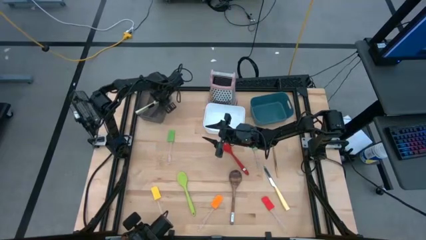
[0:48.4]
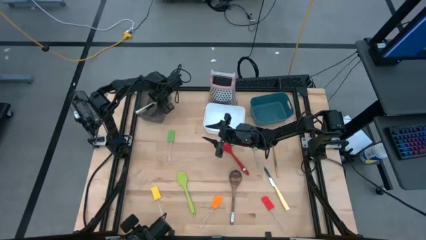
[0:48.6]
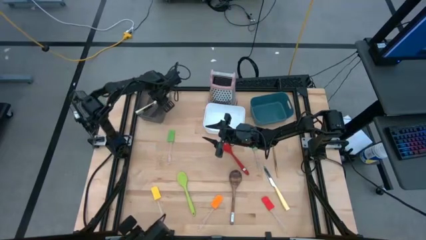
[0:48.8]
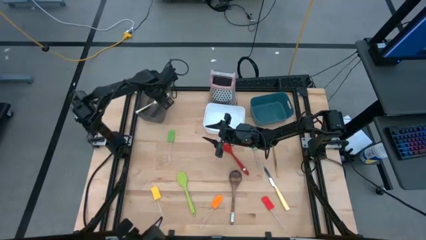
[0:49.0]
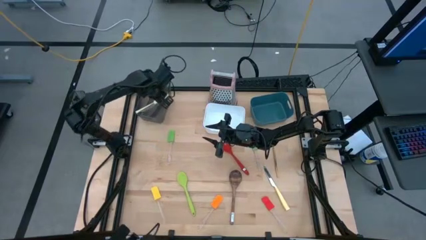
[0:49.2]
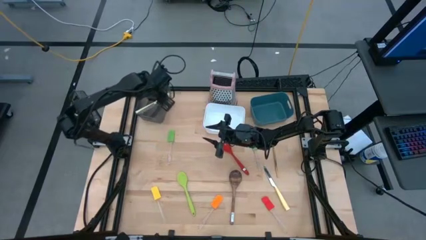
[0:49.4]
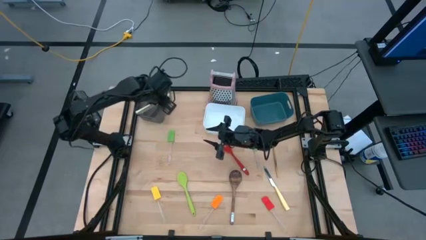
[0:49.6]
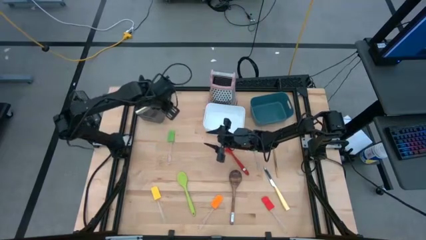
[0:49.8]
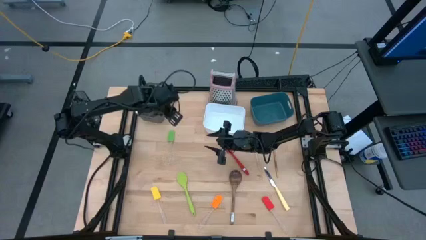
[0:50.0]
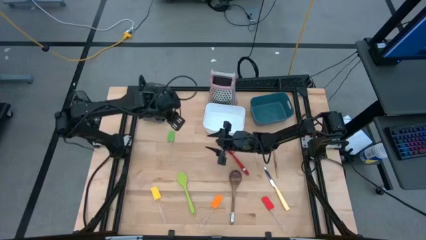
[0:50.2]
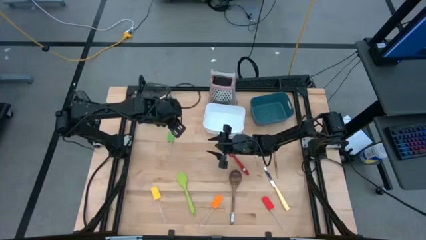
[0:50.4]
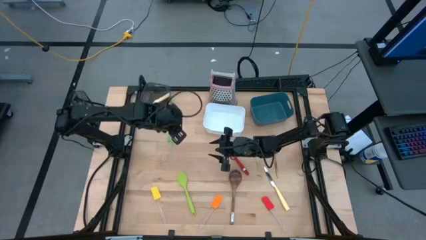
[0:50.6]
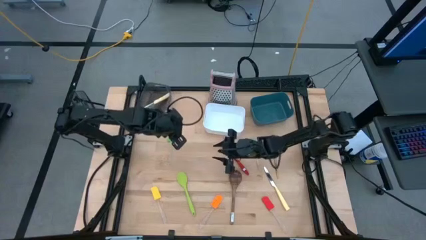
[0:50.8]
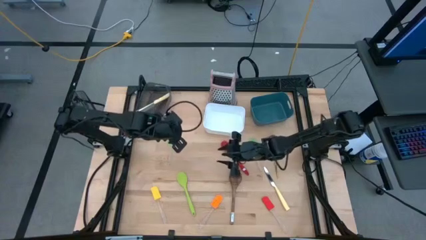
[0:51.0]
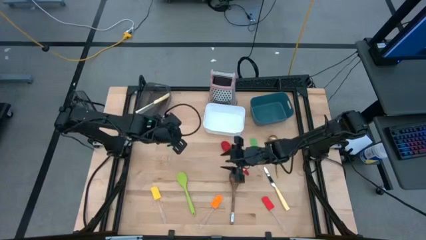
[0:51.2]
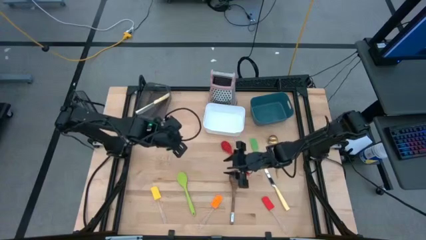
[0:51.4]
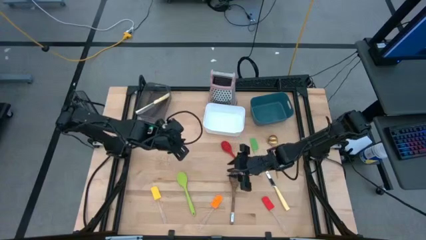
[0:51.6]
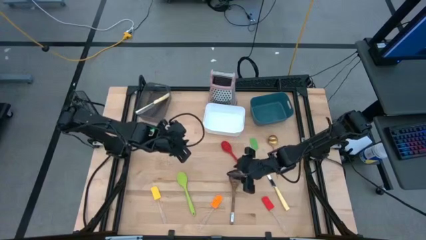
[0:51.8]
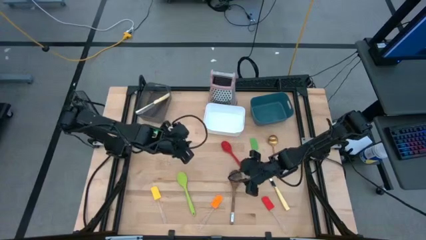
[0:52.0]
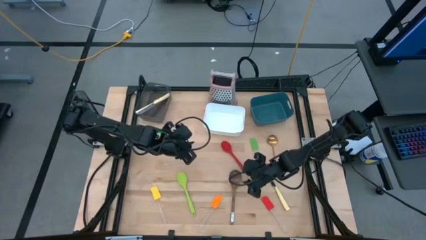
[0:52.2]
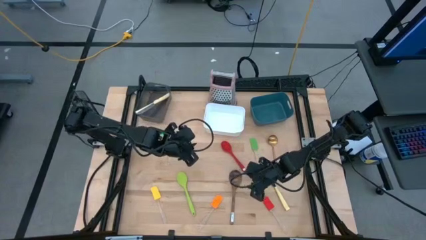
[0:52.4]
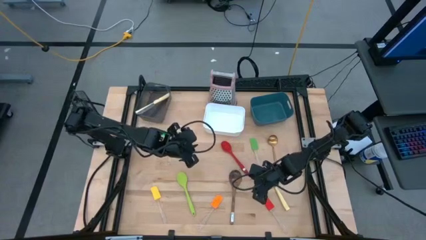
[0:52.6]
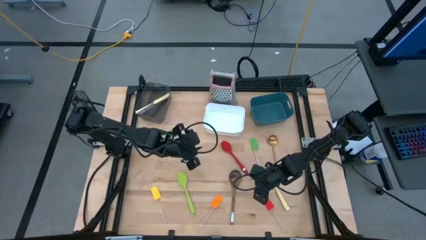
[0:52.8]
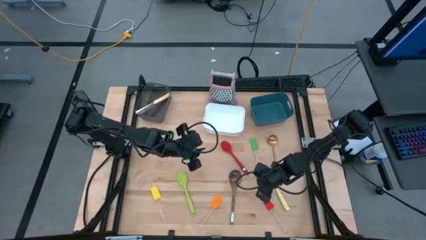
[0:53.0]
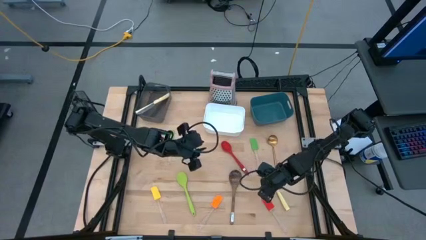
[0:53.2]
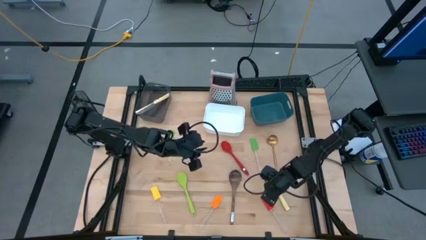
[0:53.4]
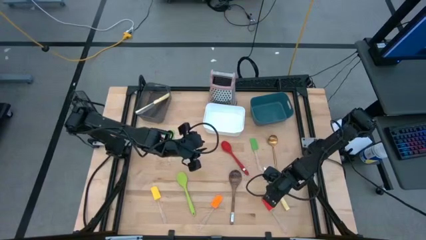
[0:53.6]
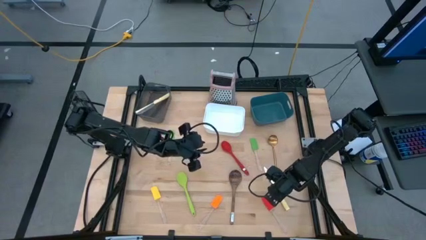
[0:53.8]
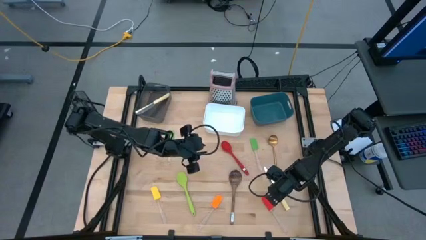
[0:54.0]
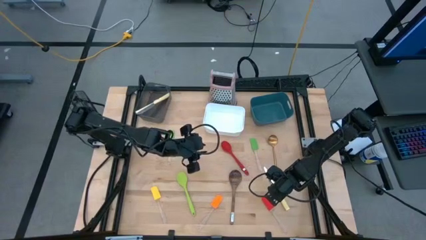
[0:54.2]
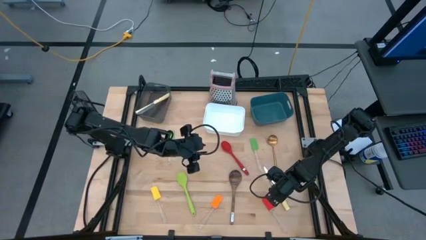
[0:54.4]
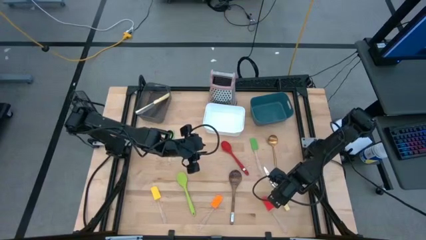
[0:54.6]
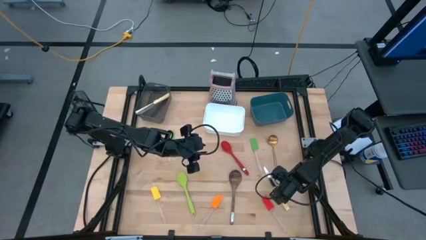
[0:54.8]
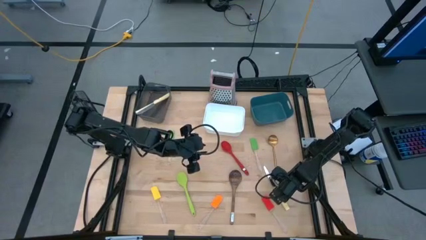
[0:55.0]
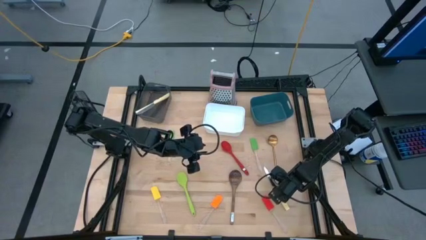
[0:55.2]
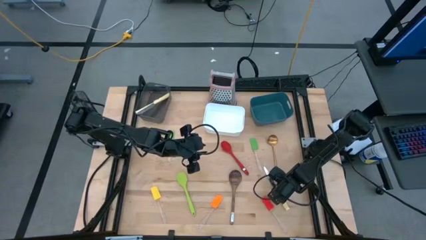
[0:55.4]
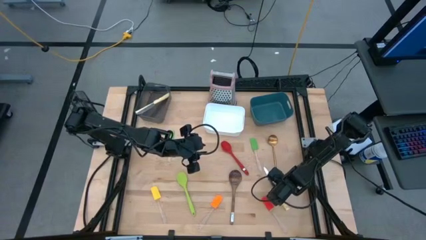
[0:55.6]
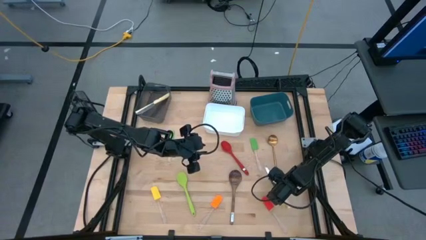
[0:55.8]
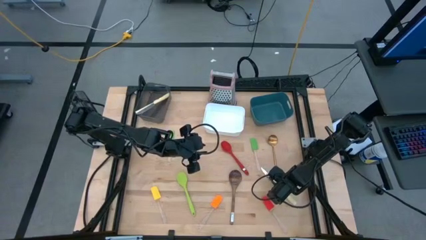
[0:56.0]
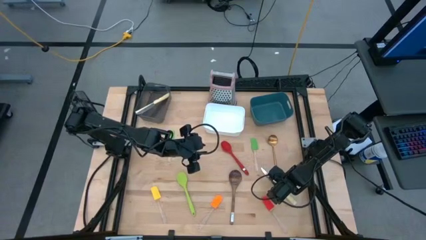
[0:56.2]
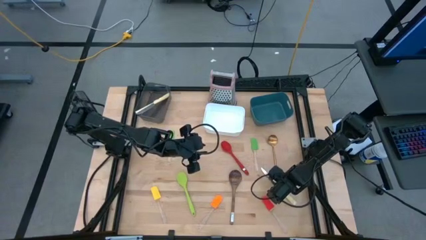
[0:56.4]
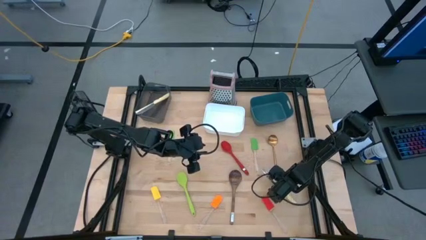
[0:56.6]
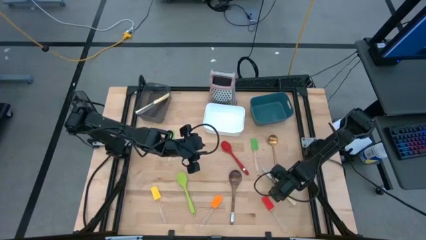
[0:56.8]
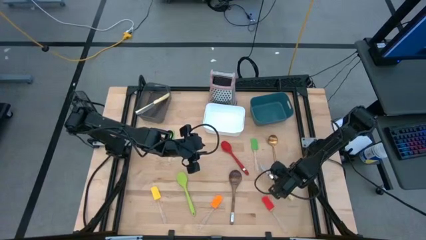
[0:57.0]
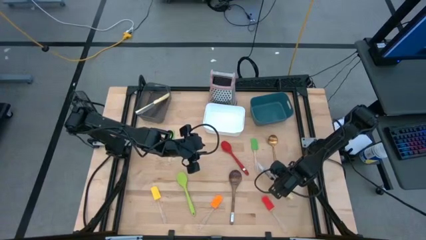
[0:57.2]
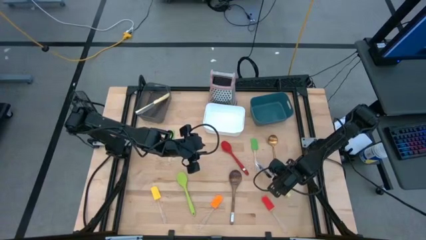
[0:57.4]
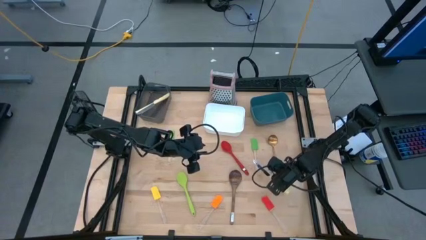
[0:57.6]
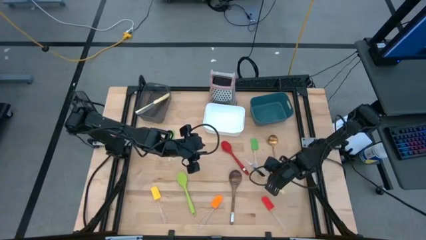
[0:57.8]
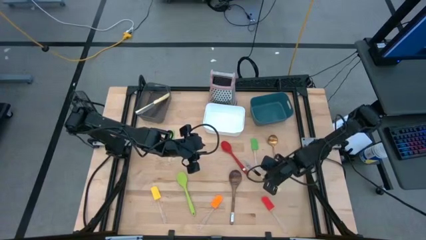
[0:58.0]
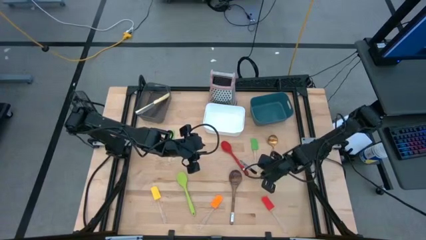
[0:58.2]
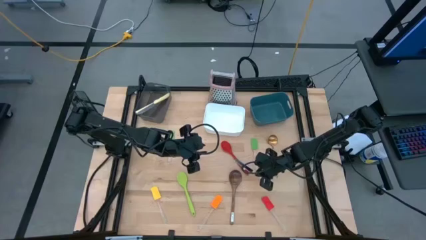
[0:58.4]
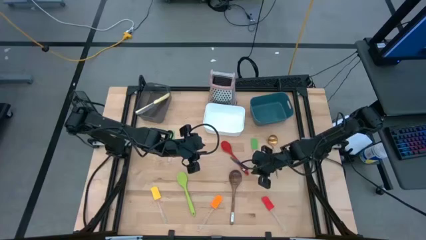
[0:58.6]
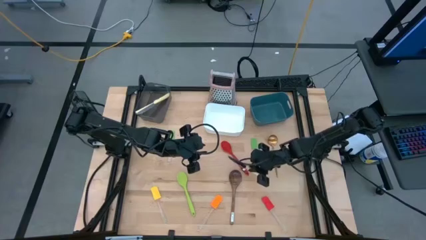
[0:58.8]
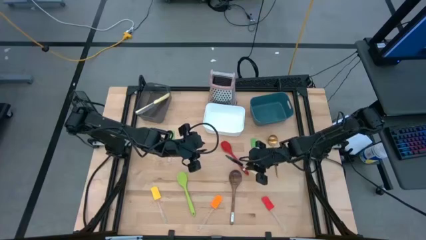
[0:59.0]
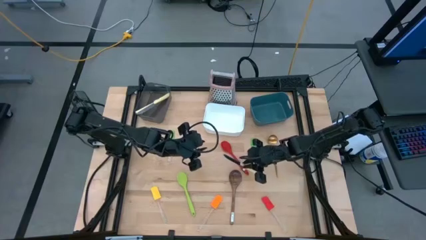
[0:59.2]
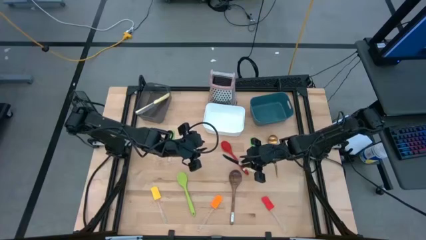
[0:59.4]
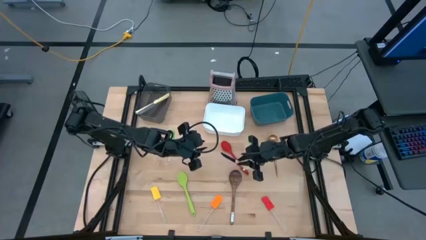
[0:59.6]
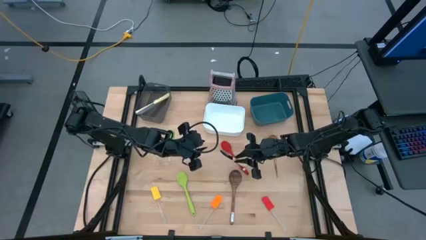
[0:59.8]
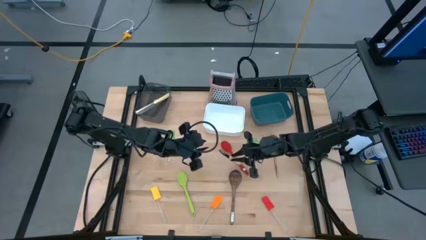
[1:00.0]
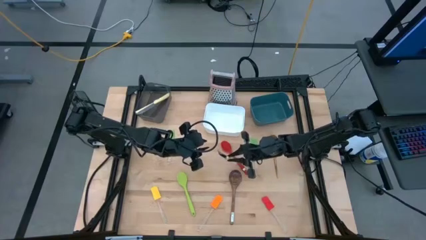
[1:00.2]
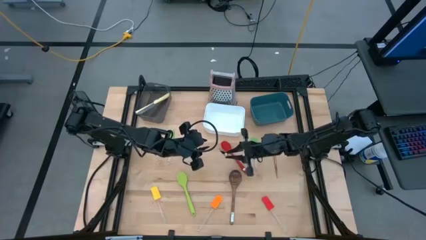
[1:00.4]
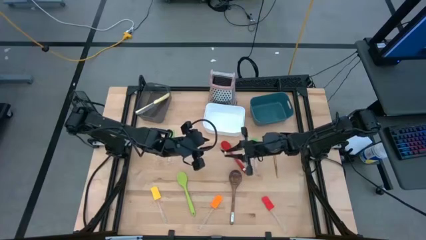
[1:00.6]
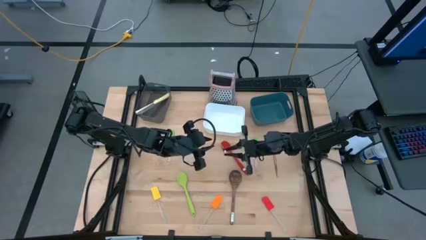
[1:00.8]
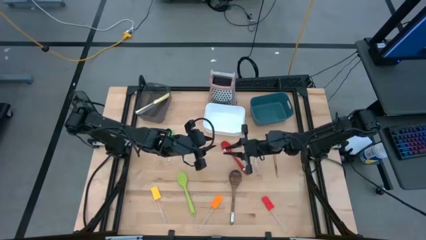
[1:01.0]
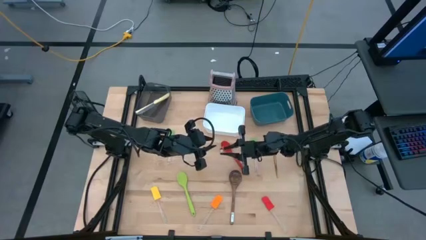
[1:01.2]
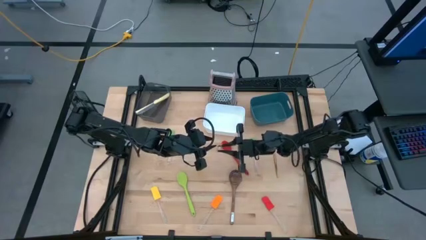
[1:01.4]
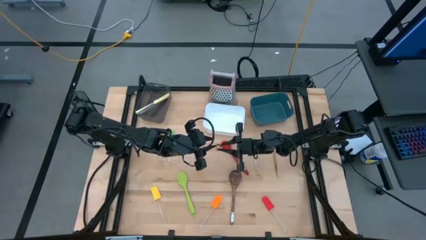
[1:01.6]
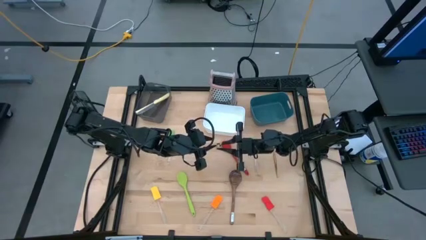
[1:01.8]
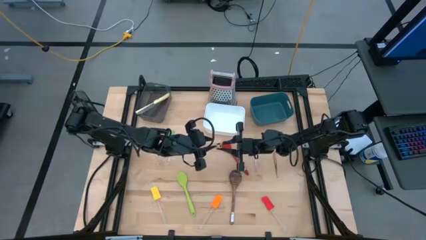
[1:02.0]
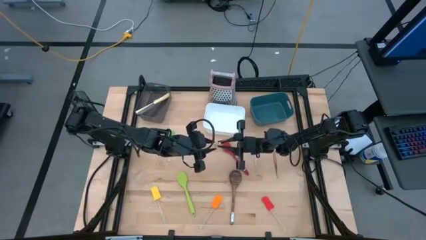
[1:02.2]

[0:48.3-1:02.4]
Task: Pick & Place Kitchen Items
Put the yellow knife into the black bin

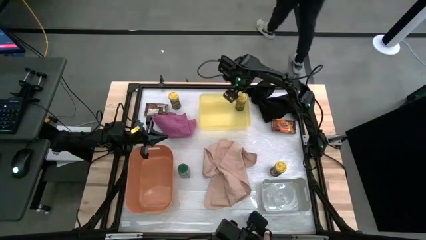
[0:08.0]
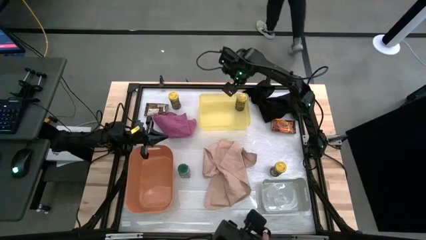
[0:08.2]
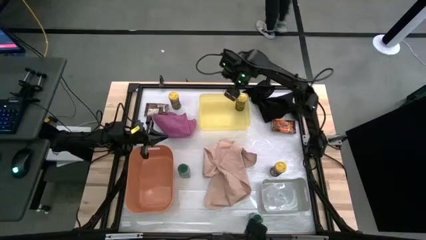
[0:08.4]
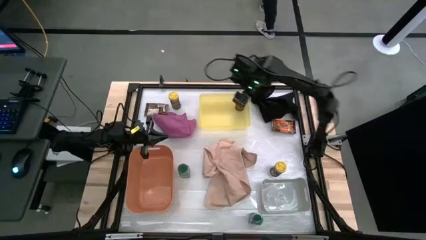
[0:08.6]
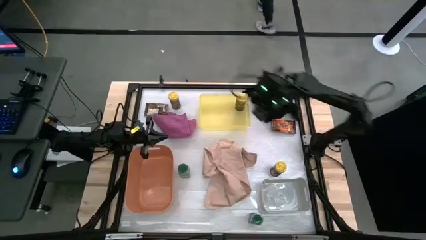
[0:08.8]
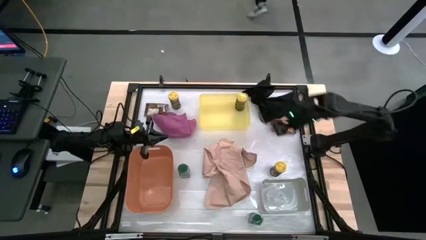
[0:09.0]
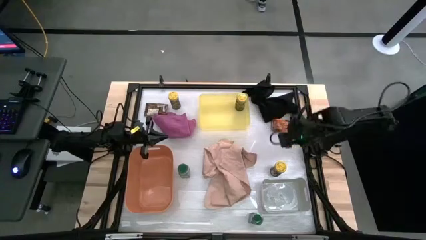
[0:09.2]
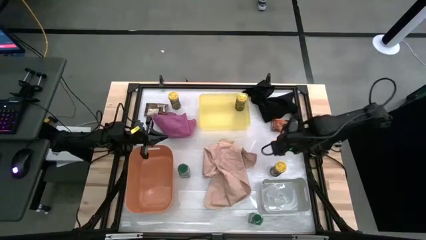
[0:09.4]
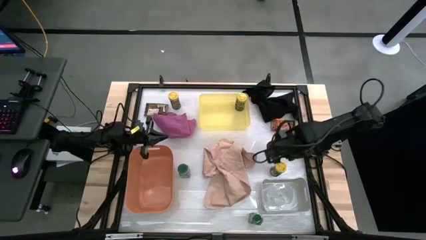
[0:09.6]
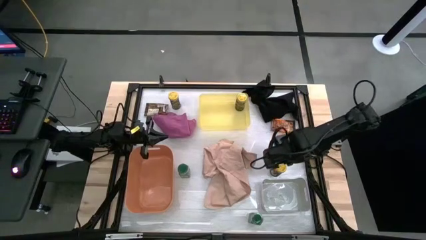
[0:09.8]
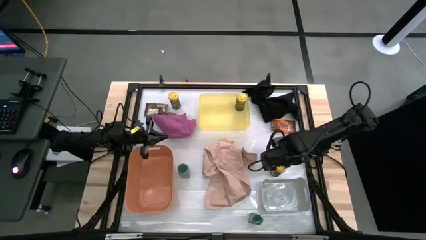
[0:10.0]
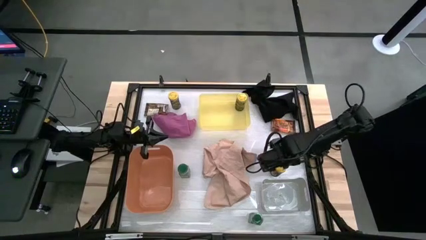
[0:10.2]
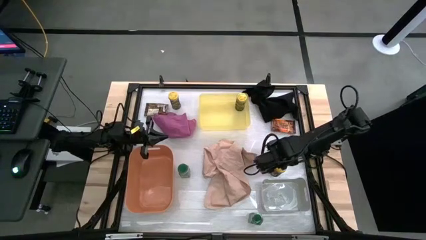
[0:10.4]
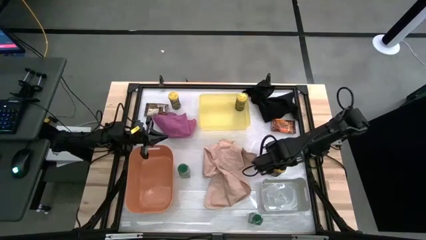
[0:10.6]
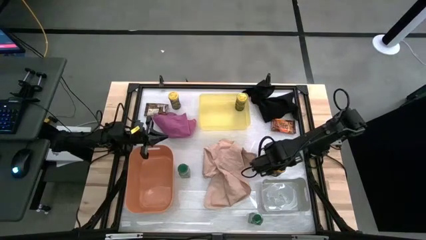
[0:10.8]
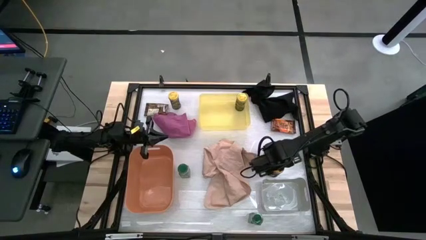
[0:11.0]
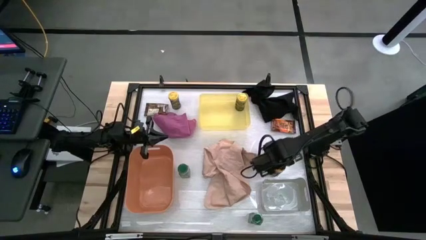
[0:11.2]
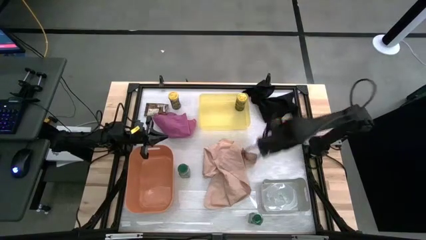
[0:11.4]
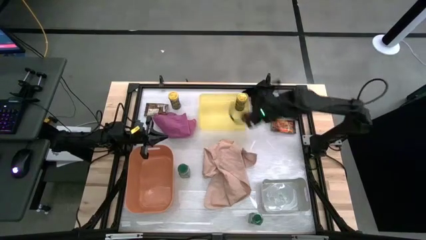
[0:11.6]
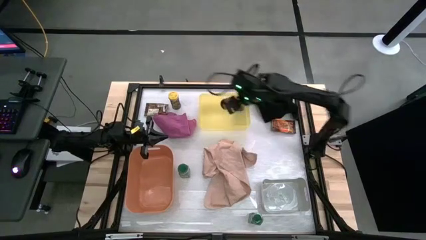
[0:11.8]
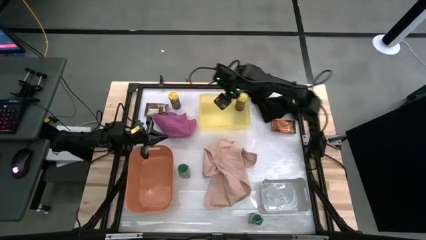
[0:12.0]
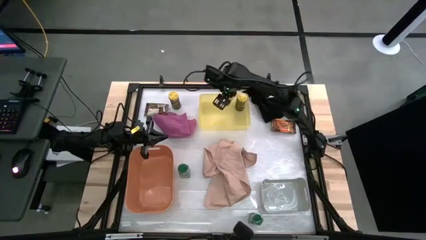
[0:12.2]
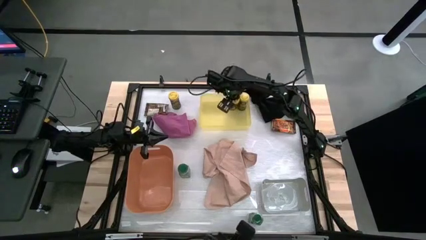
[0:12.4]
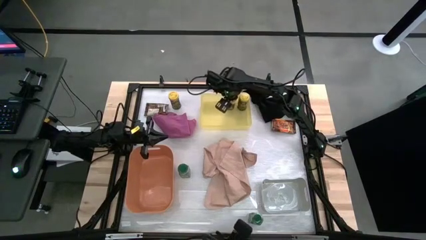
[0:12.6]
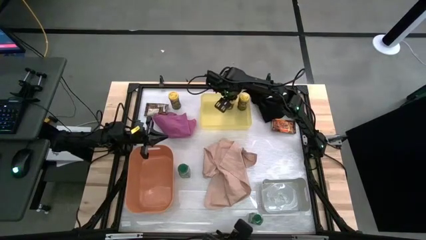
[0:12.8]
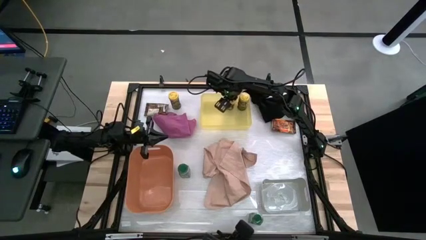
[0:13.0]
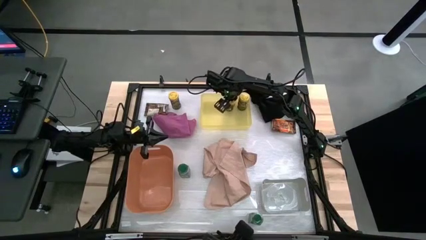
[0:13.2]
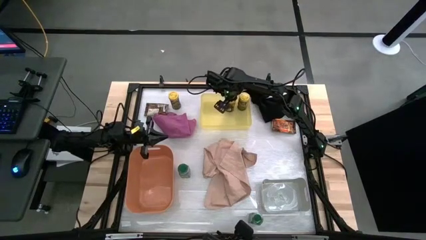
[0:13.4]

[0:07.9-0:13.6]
Task: Sort spices by type
Put the bottom yellow spice bottle into the yellow bin
